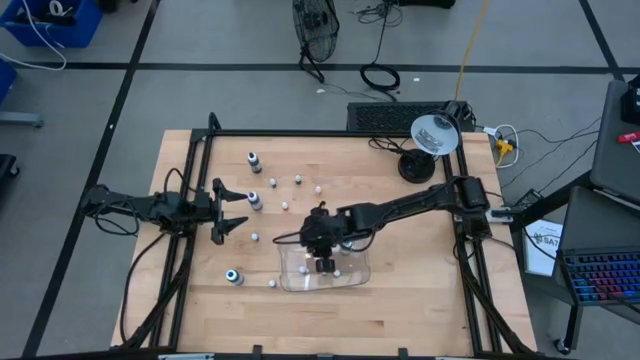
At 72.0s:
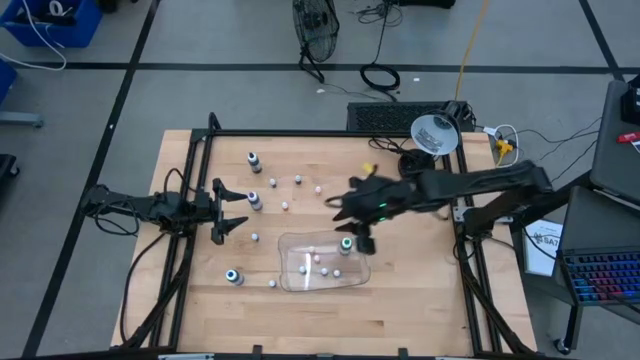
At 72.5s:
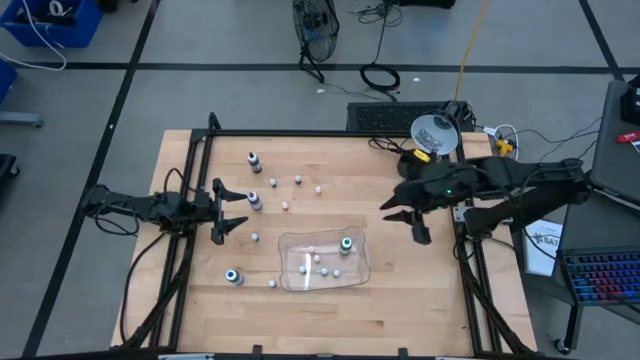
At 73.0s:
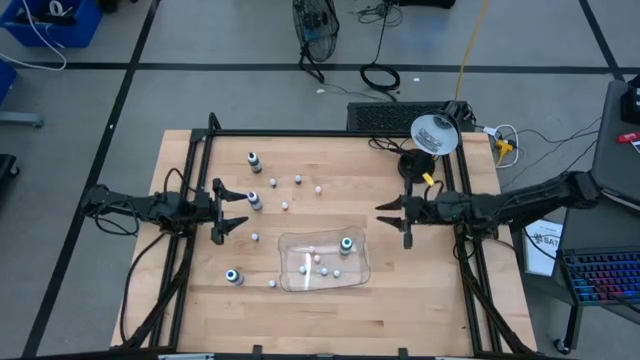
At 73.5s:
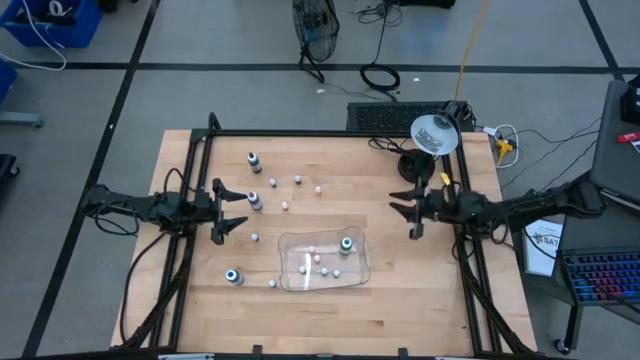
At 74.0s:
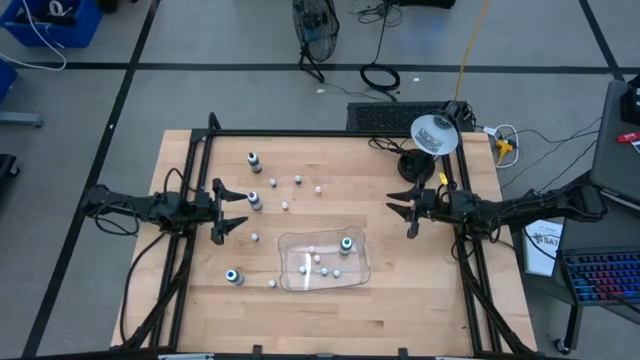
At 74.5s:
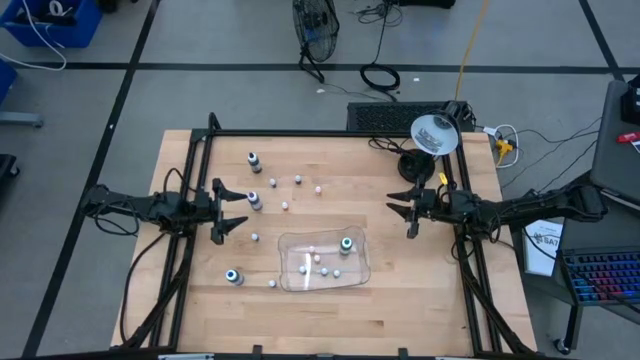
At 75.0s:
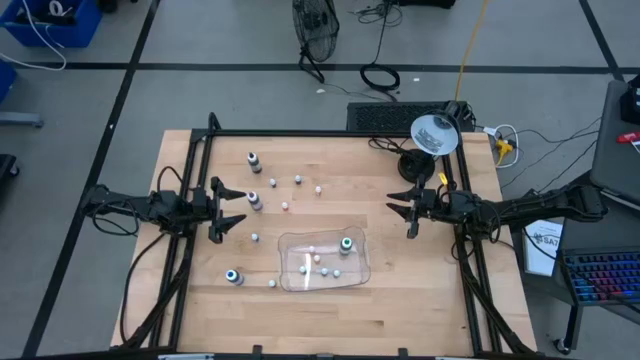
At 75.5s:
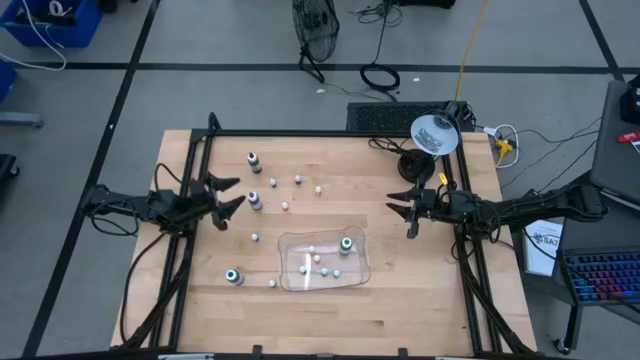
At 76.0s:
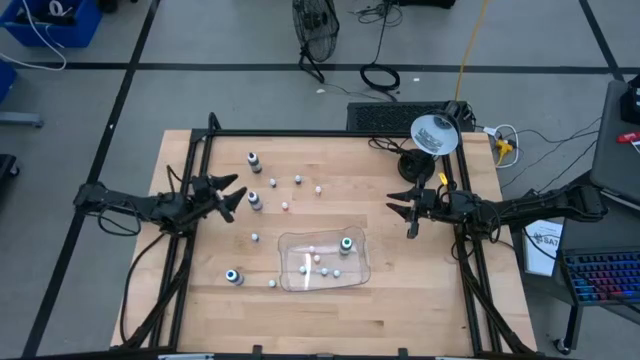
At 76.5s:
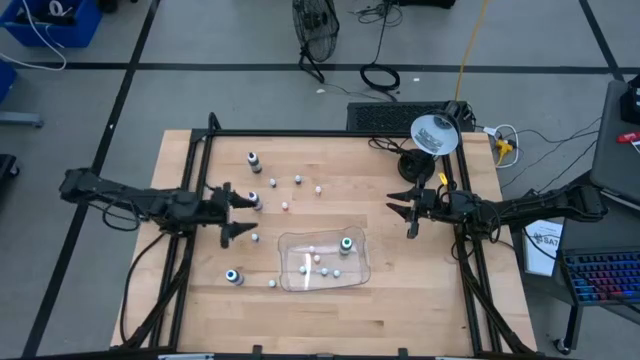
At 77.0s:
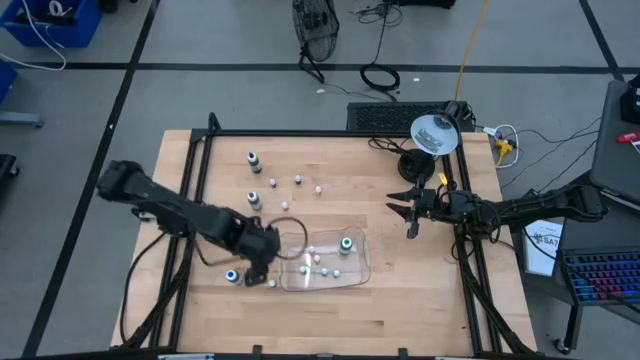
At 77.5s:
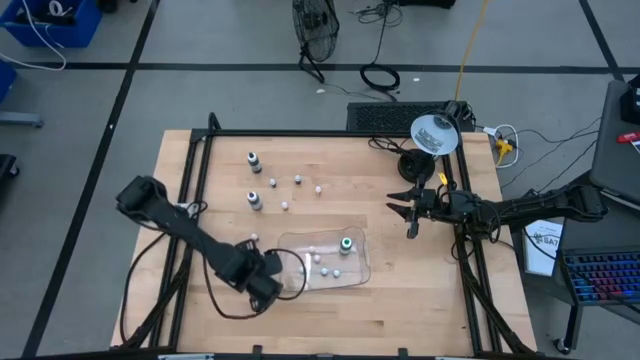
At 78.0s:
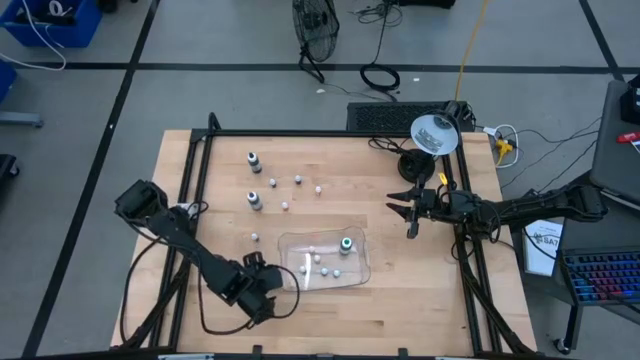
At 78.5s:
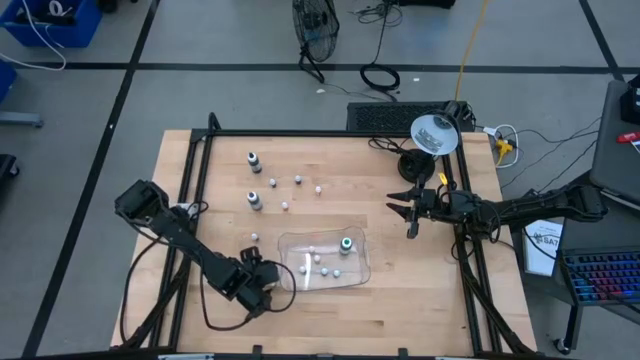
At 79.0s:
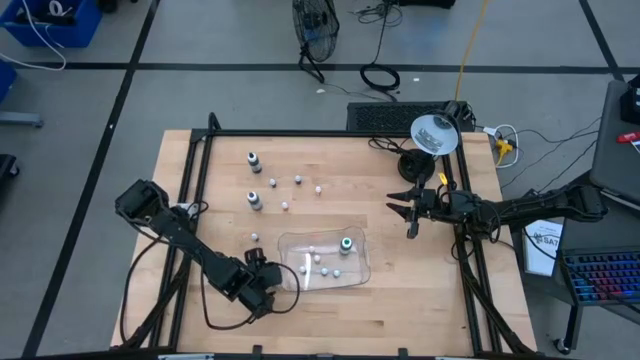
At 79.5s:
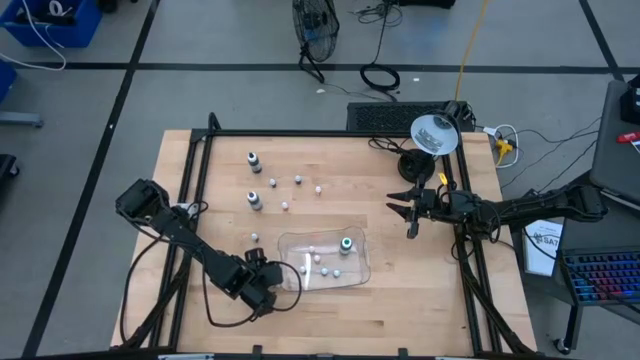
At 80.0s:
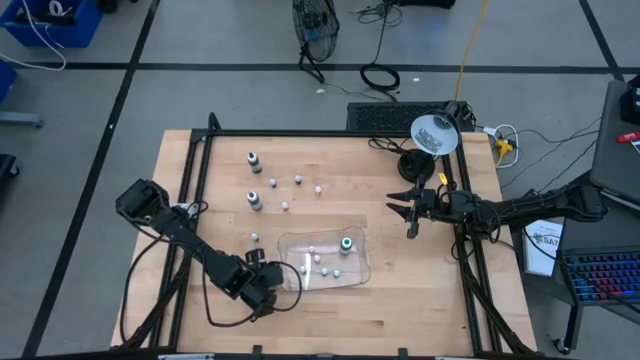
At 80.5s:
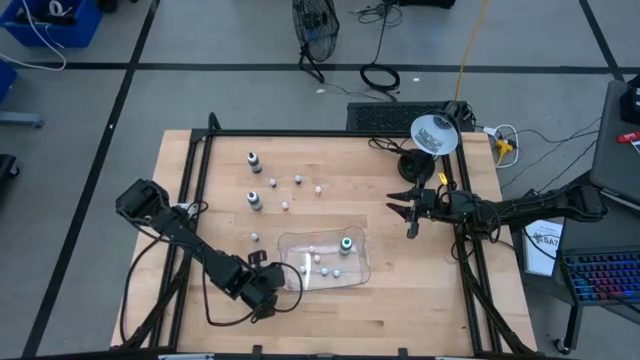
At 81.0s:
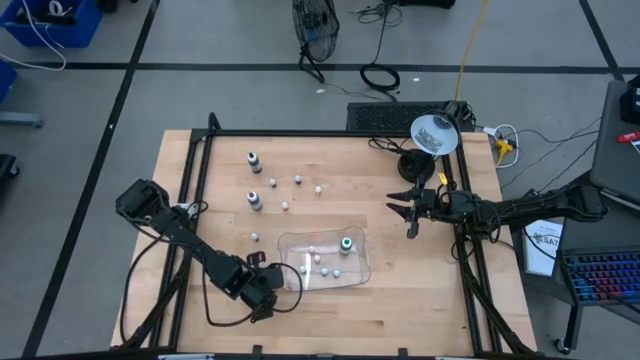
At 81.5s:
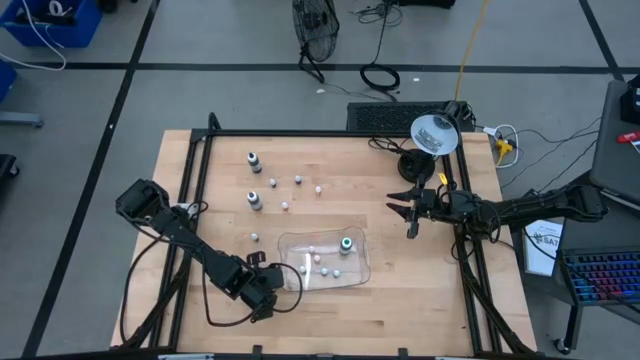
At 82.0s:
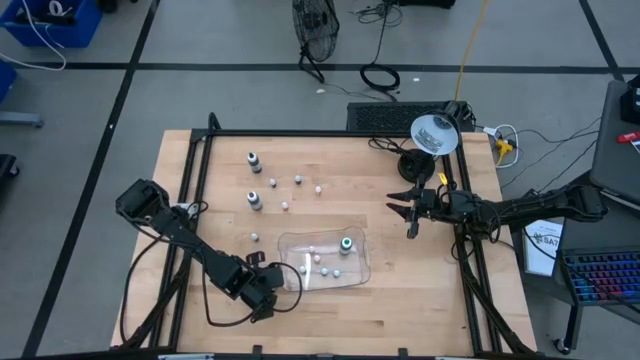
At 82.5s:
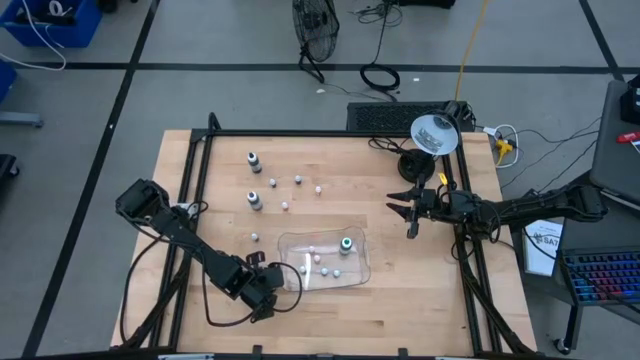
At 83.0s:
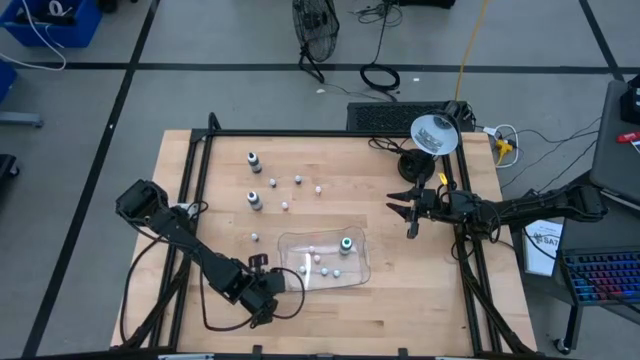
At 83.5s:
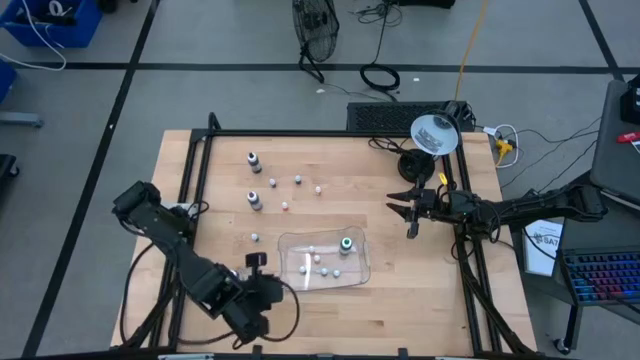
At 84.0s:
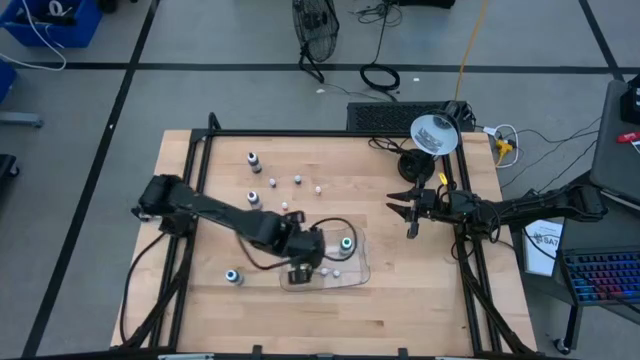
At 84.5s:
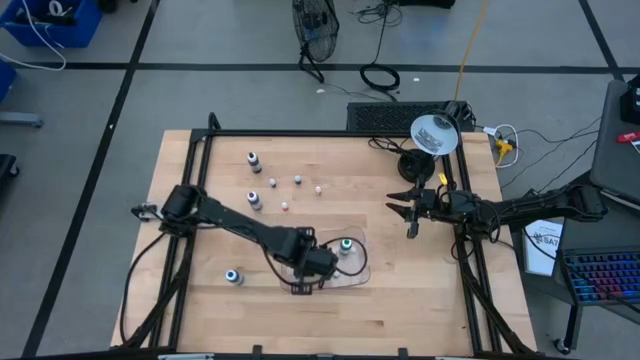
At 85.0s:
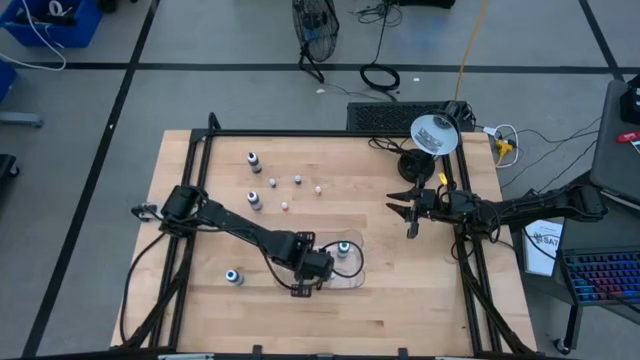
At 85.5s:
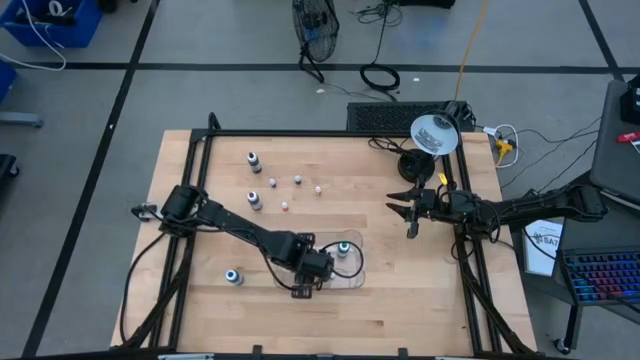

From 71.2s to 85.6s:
Task: Pick & Place food coloring
Put the bottom small black food coloring bottle into the bin

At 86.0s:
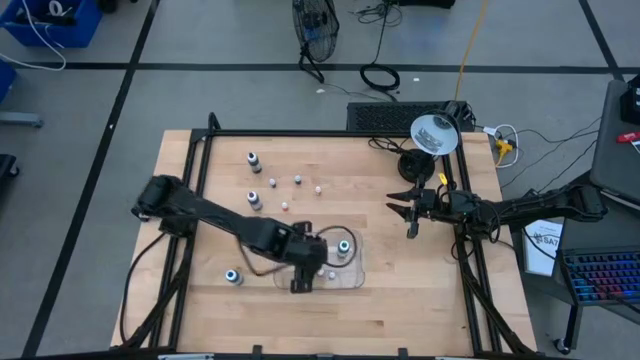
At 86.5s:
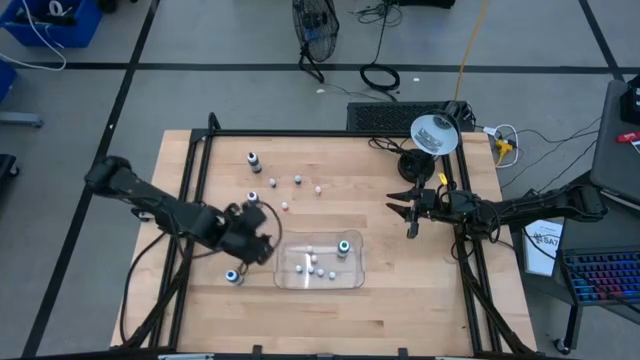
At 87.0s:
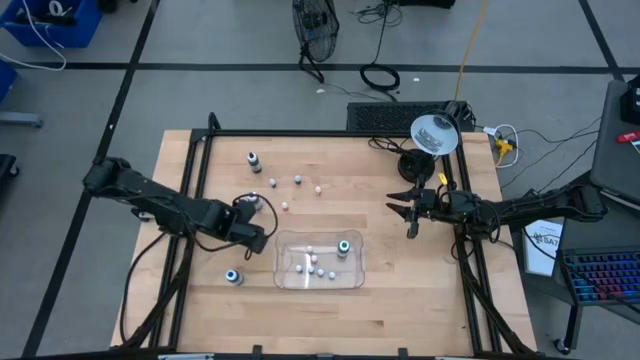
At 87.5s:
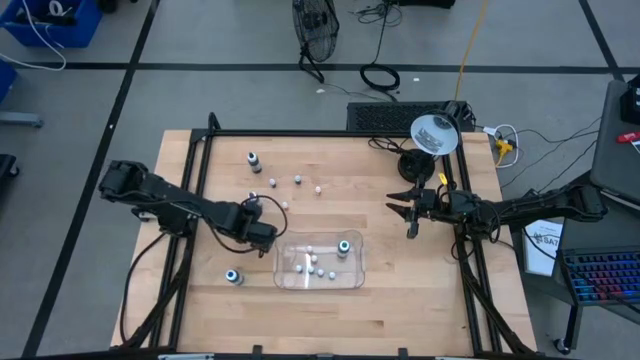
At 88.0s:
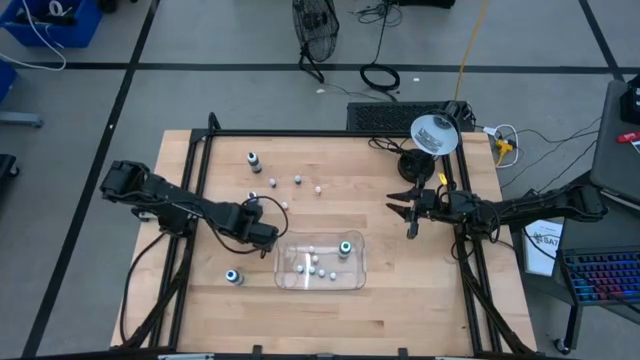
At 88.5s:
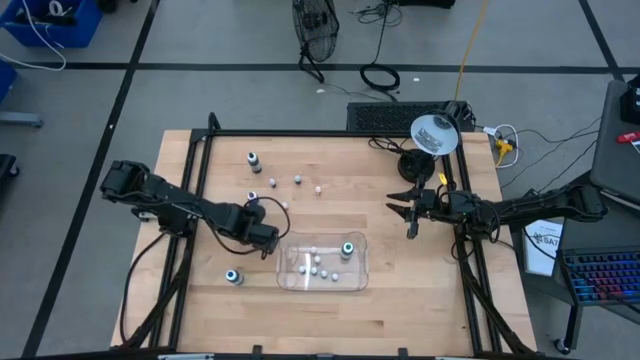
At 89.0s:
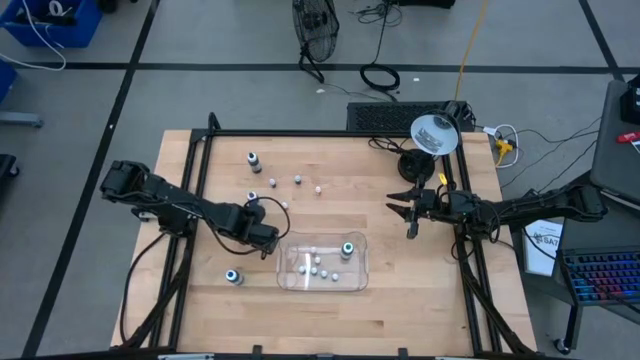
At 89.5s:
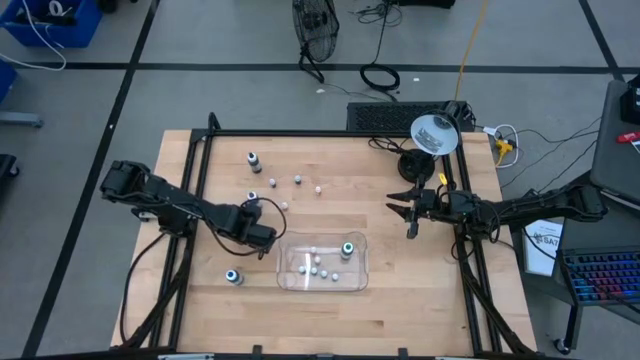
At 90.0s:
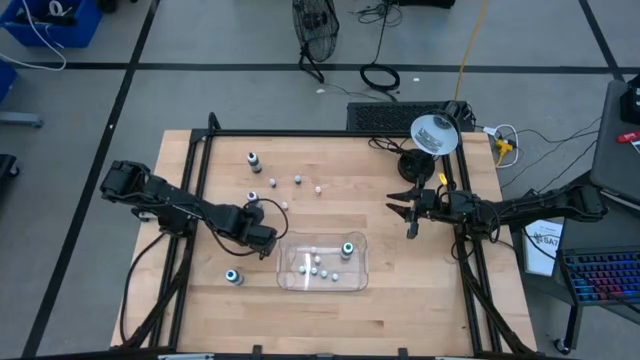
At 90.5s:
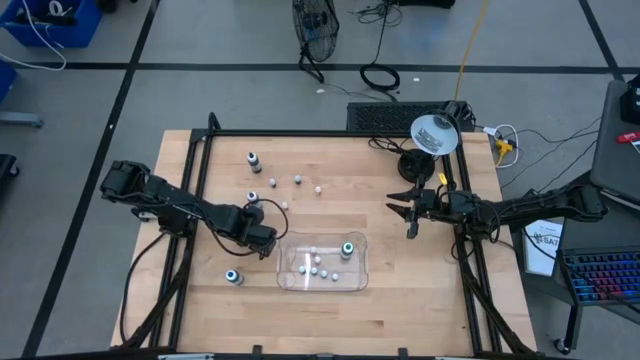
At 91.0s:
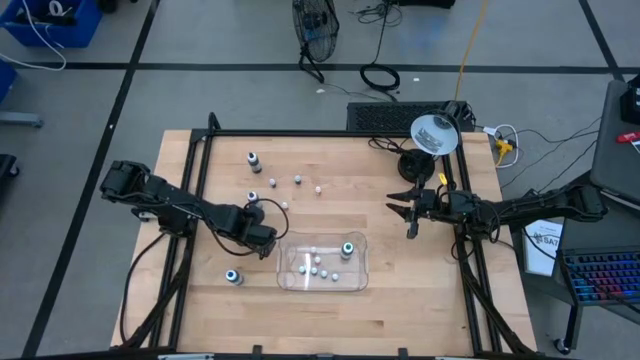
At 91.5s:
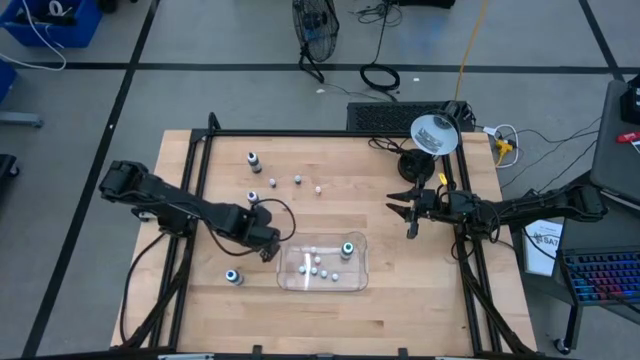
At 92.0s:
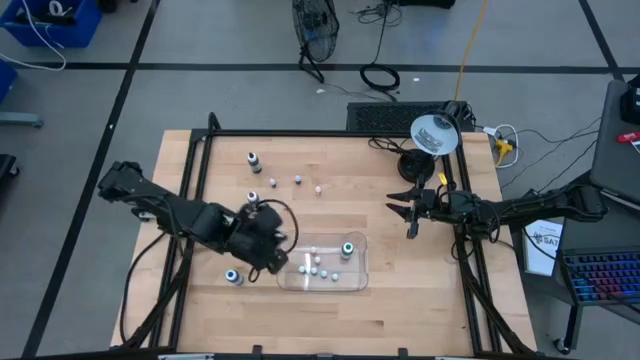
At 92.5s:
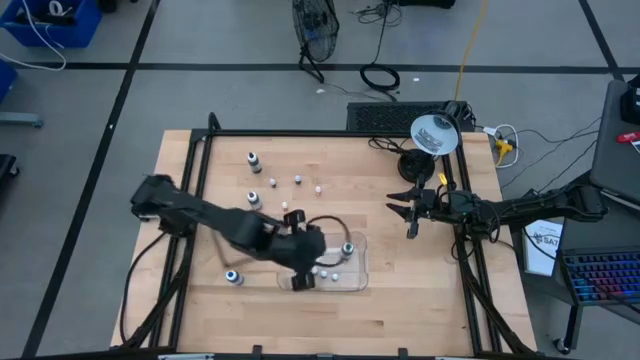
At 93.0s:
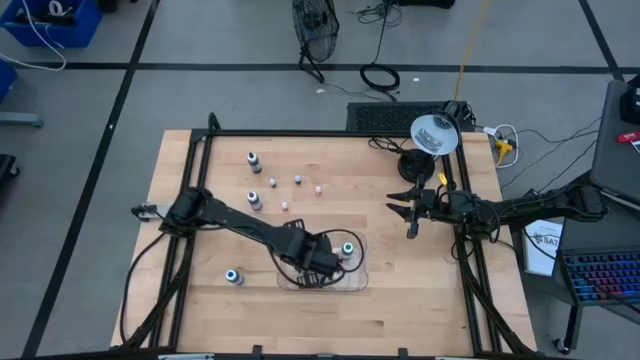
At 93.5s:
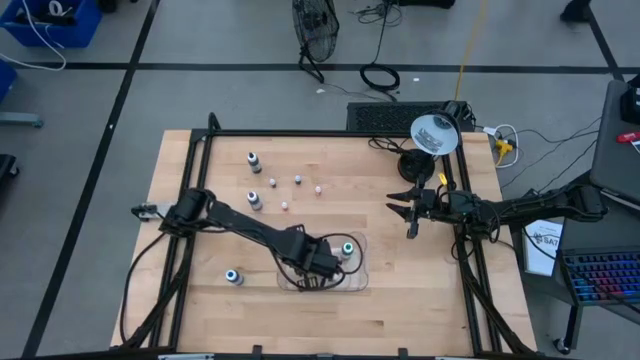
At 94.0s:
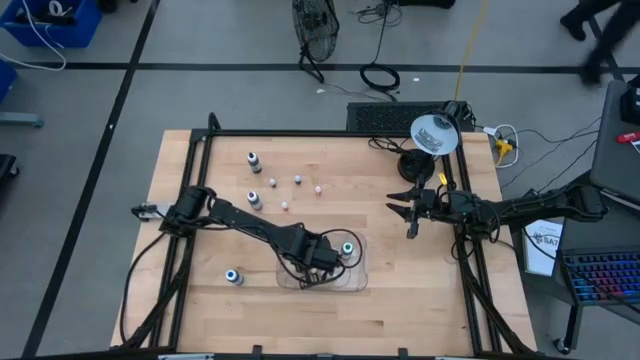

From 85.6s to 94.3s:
Put the small purple food coloring bottle into the bin
